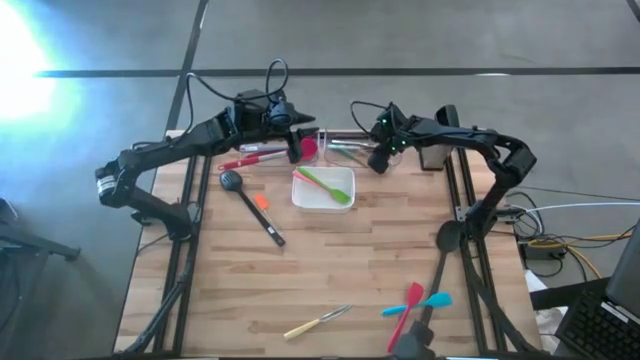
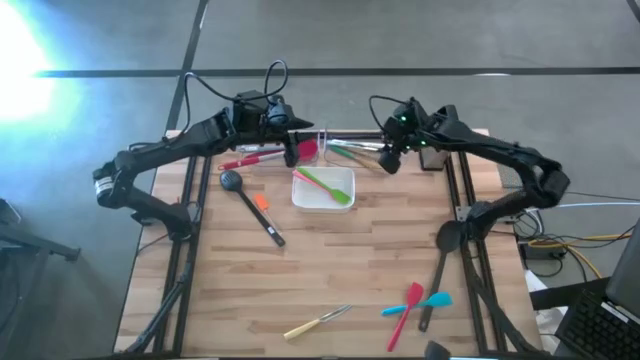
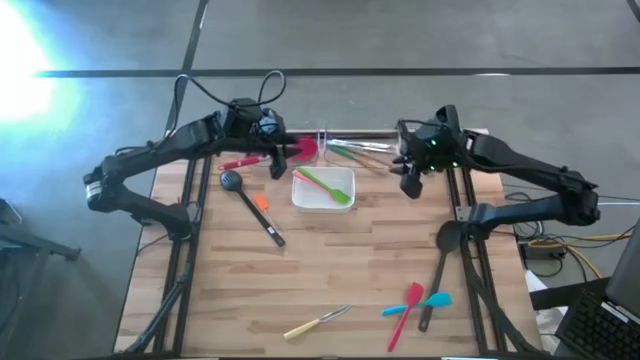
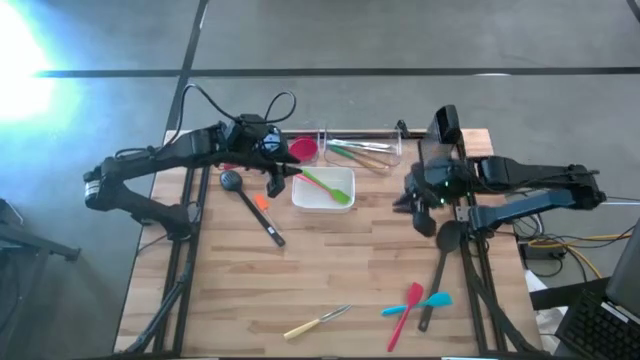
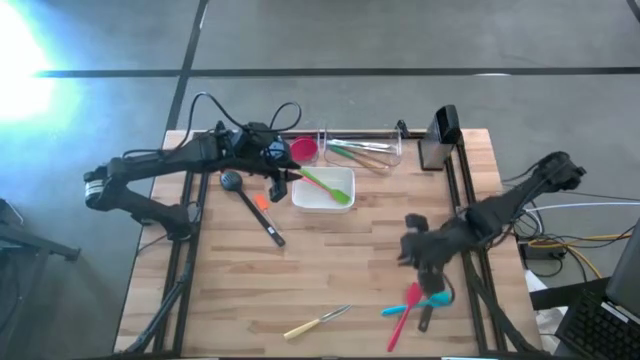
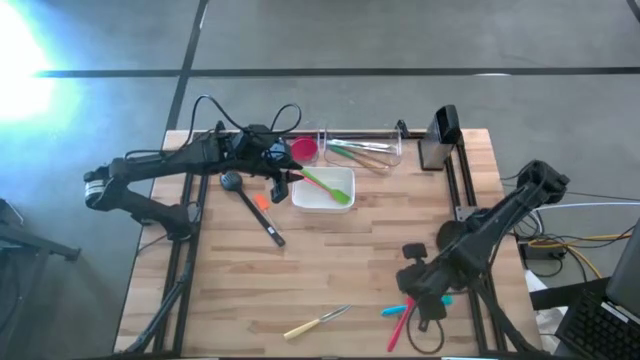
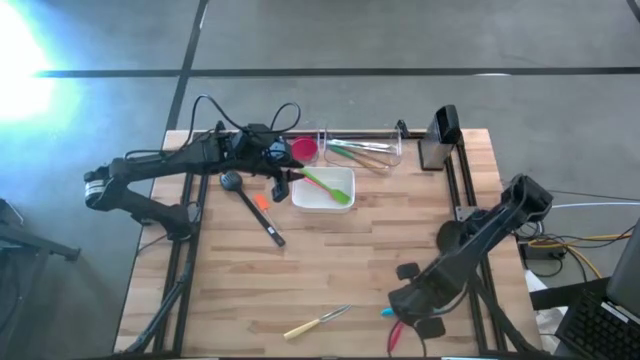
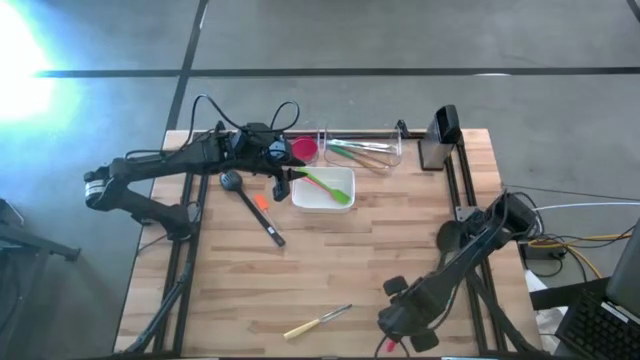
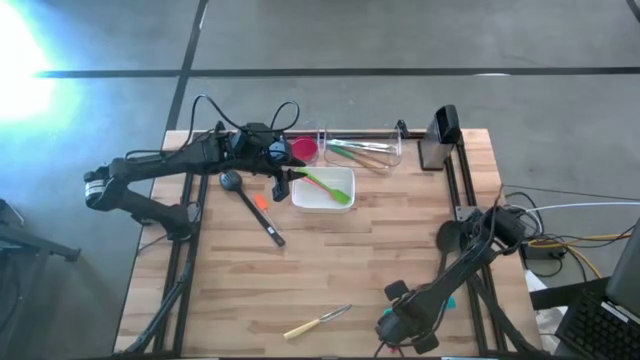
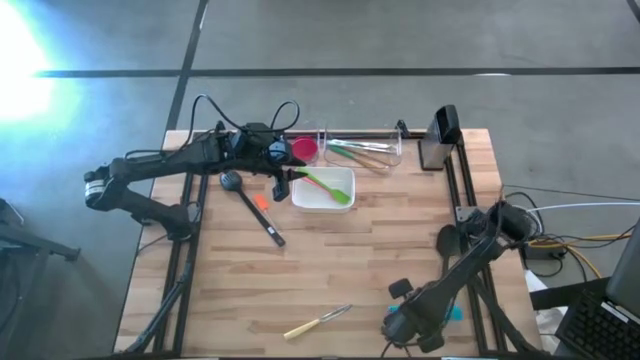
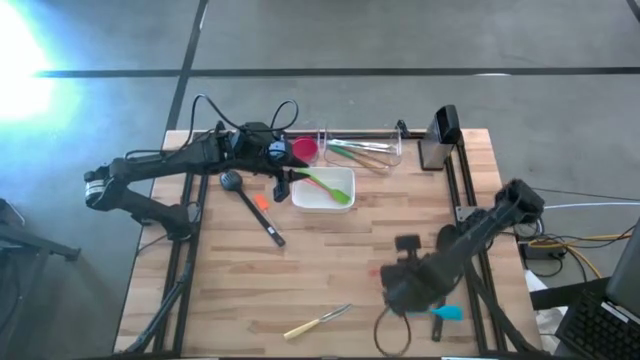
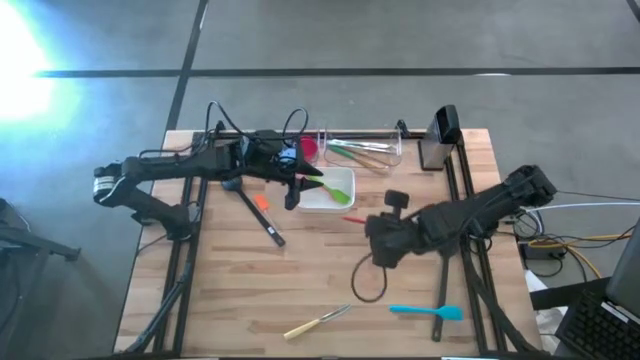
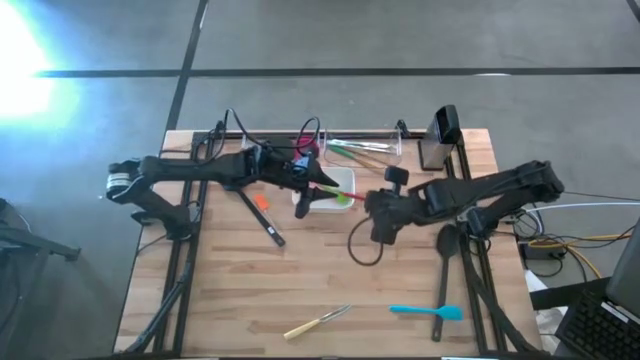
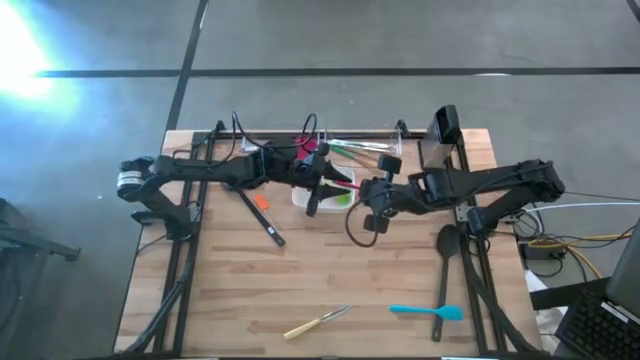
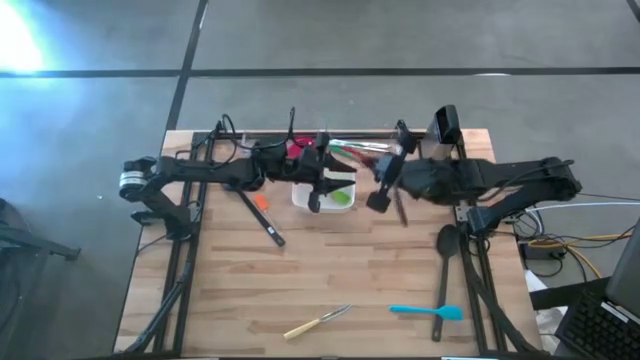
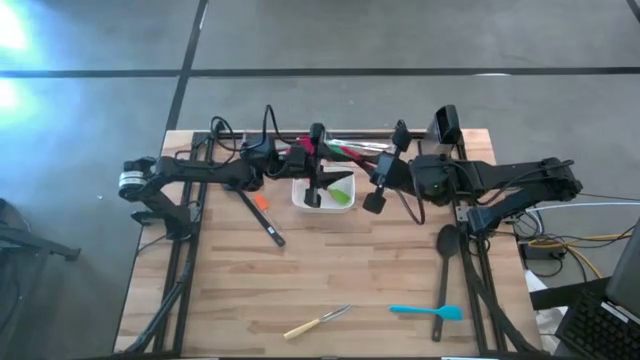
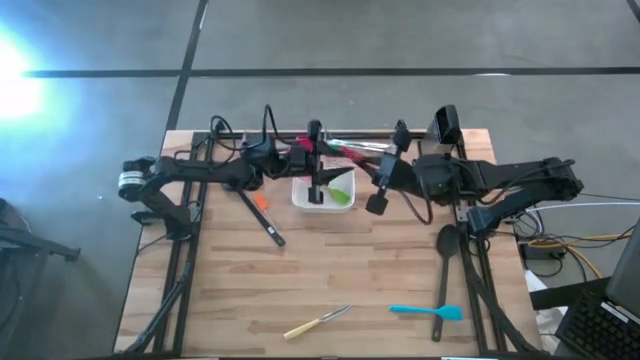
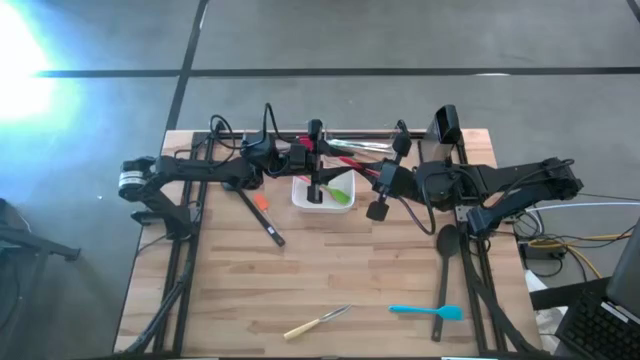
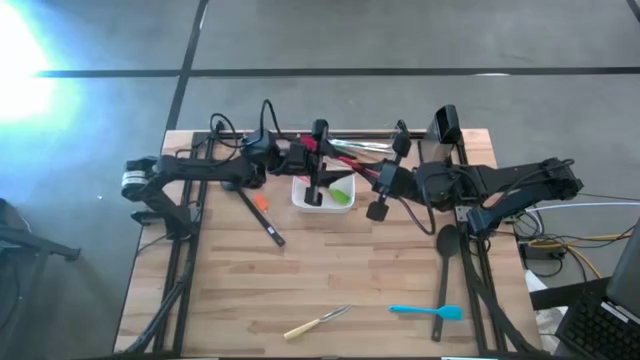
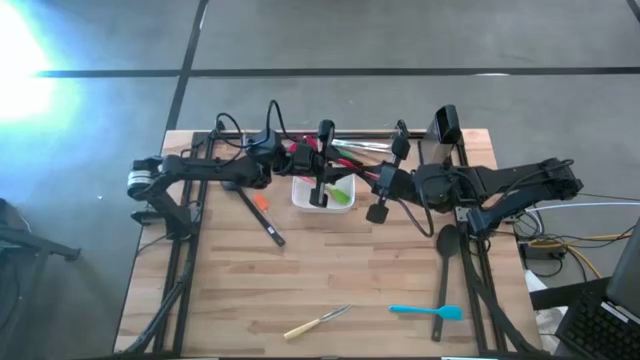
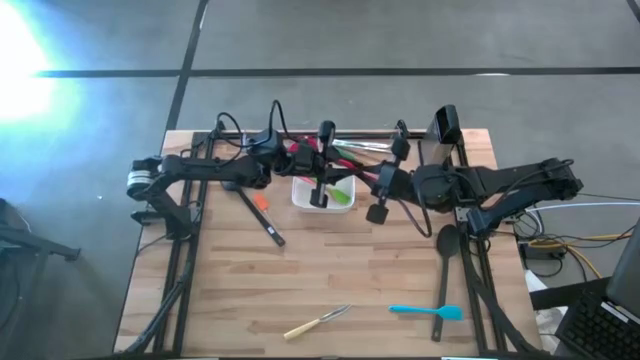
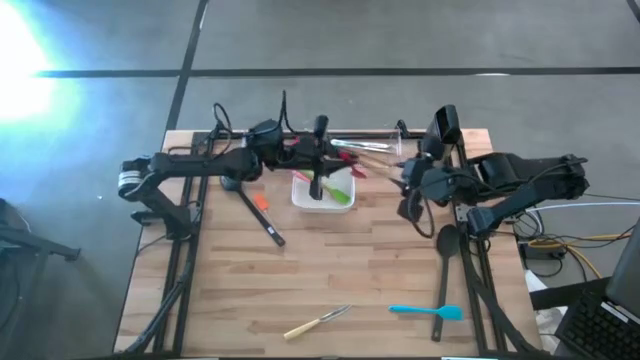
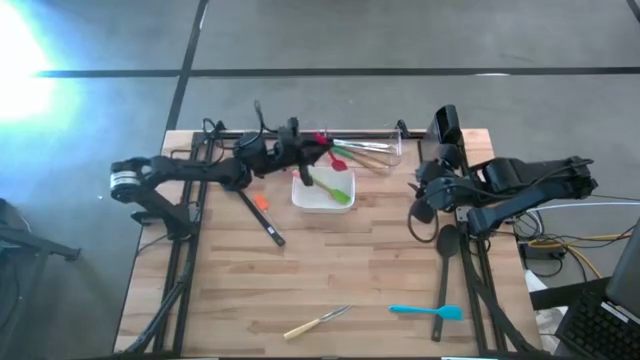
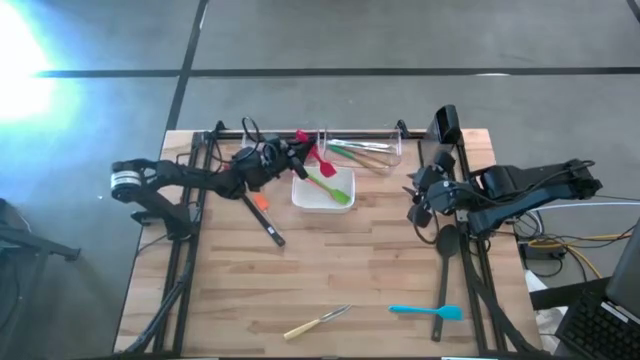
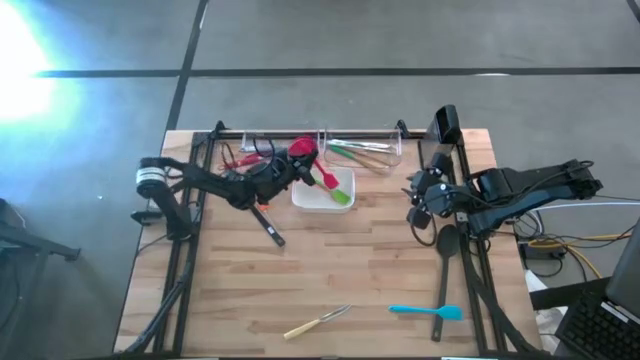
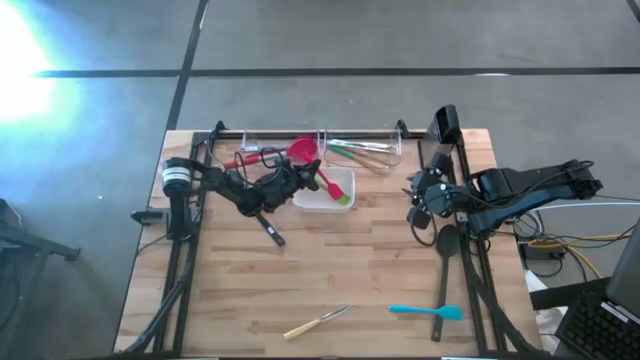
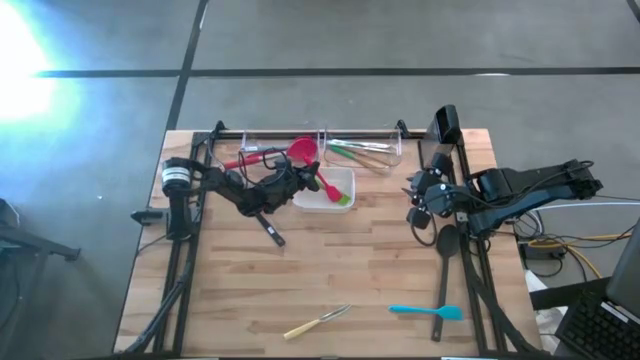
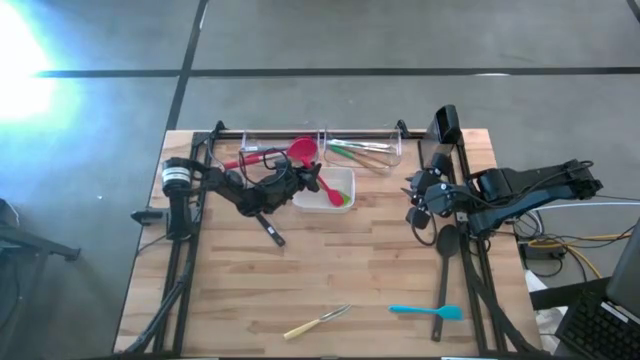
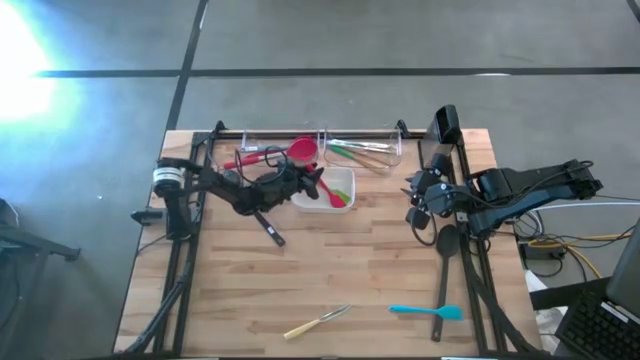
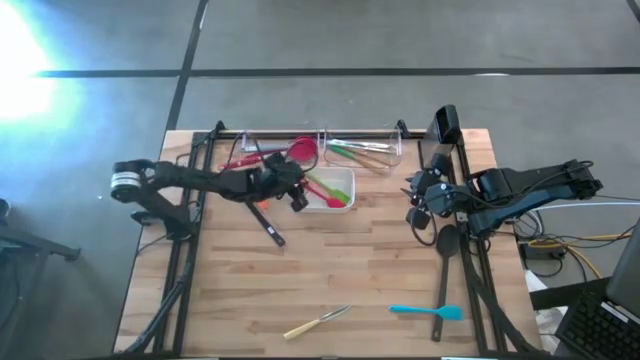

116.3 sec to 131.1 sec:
Task: Pick & Place Kitchen Items
Put the red spatula into the white bin

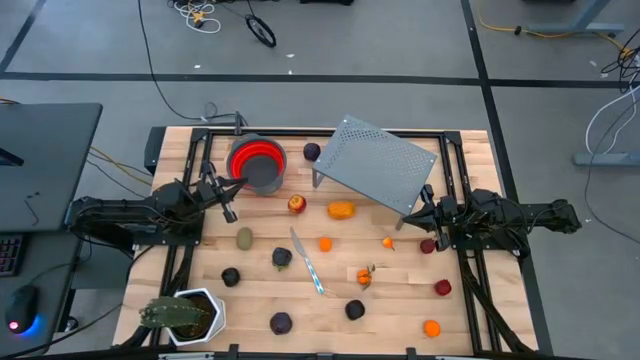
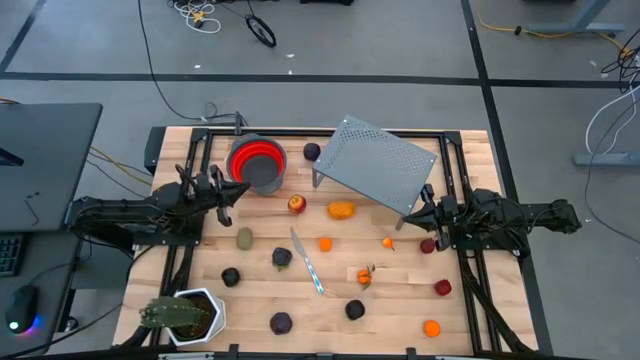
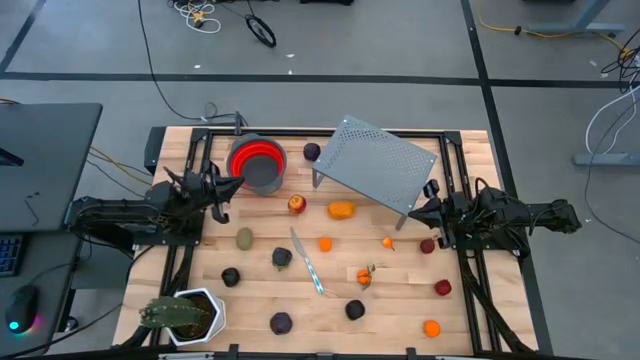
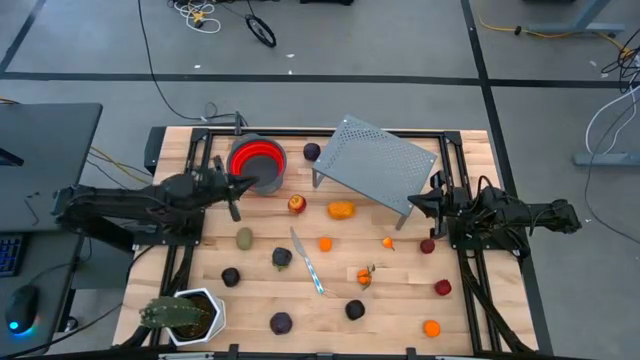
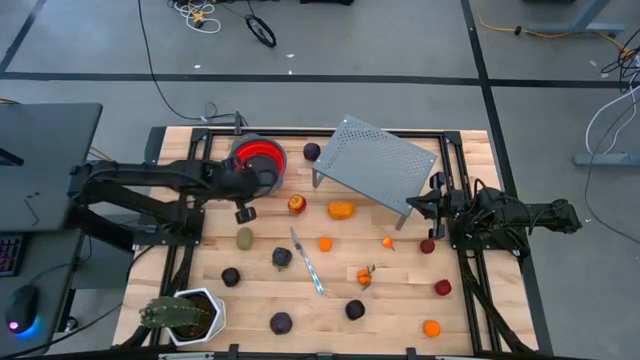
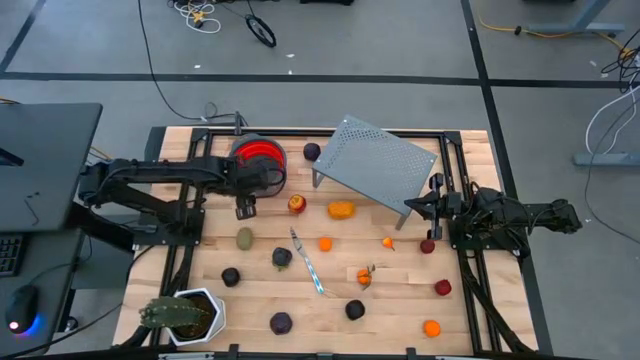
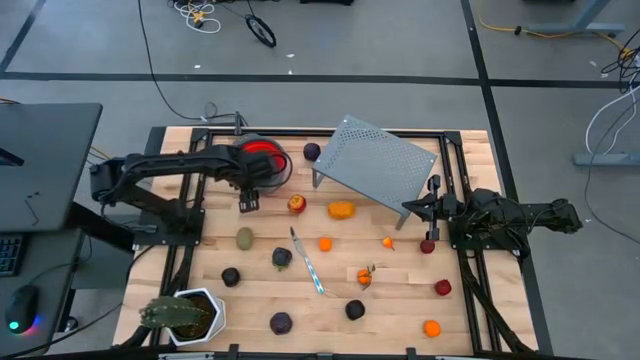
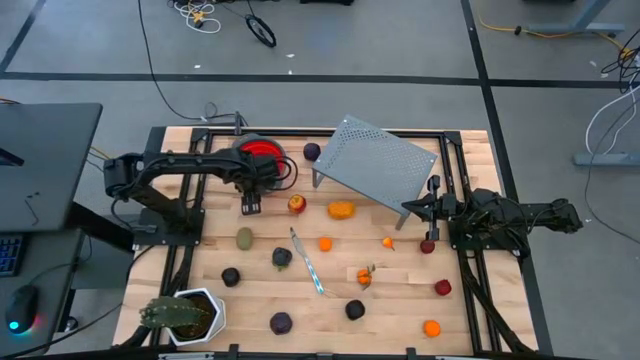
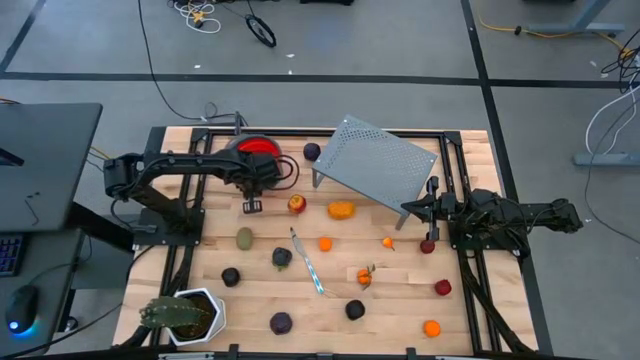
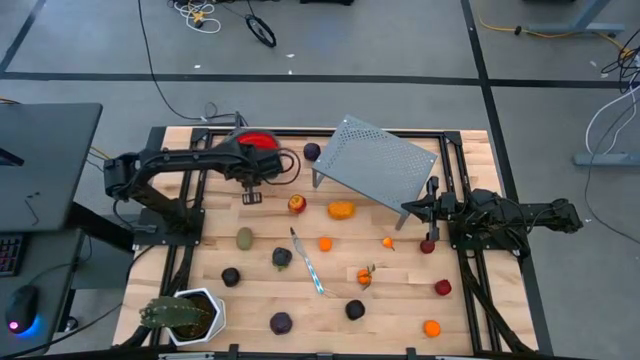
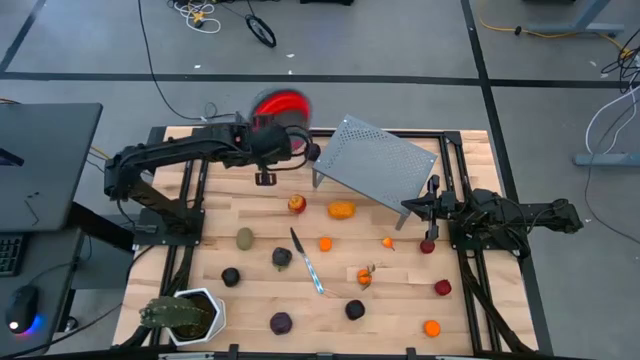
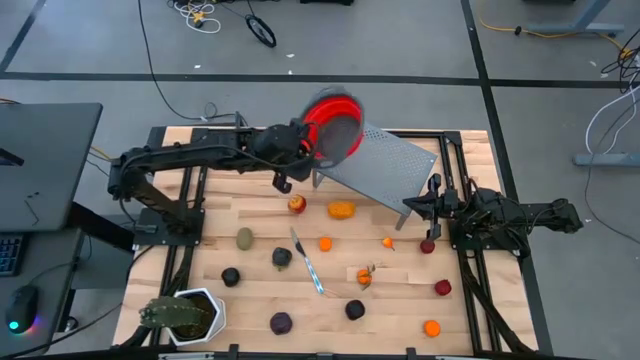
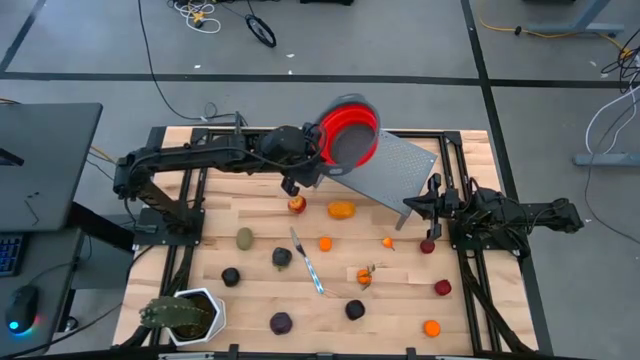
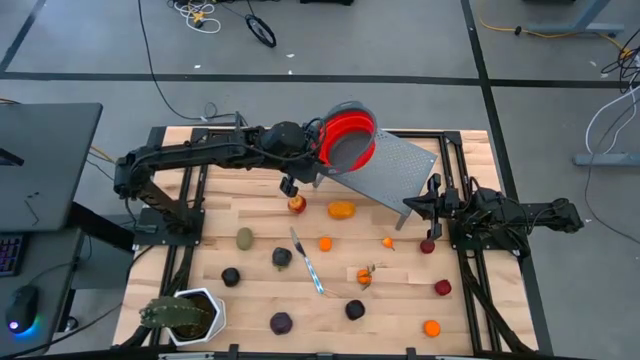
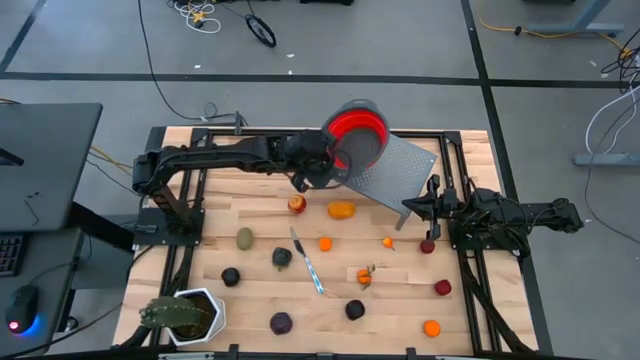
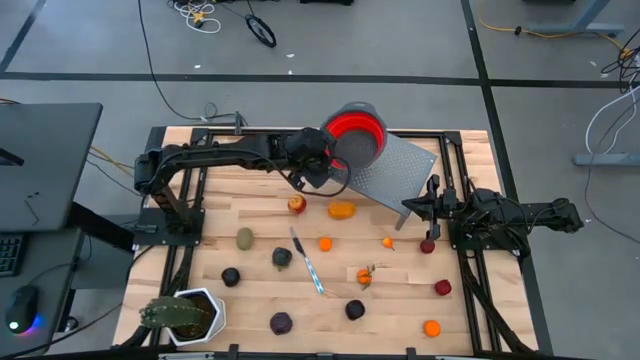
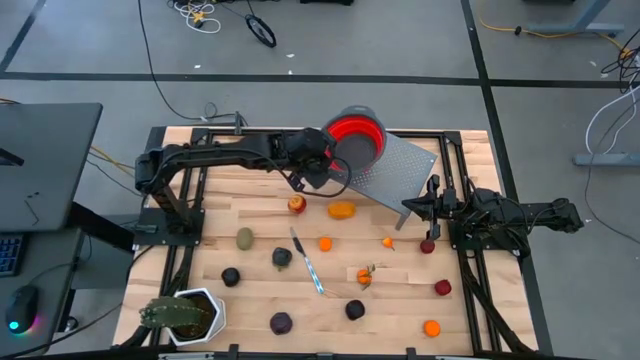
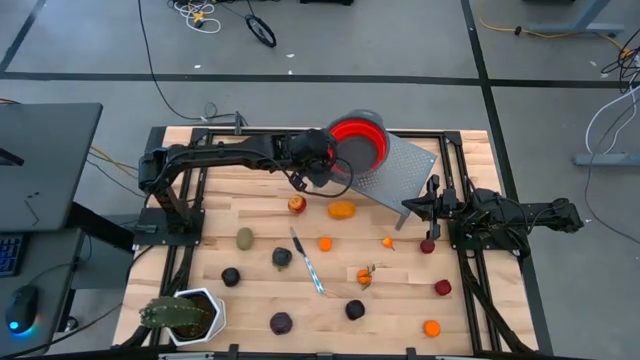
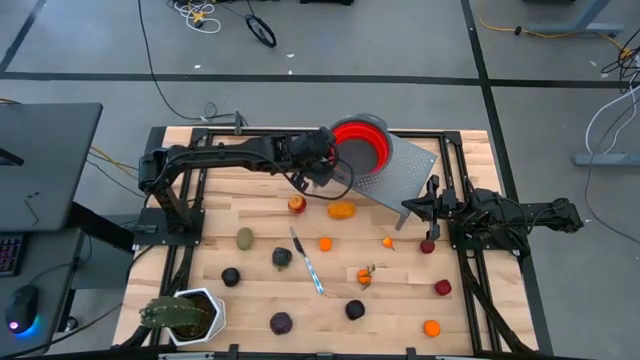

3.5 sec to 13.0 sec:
Task: Pick & Place Fruit
Put the red strainer bowl on the shelf
